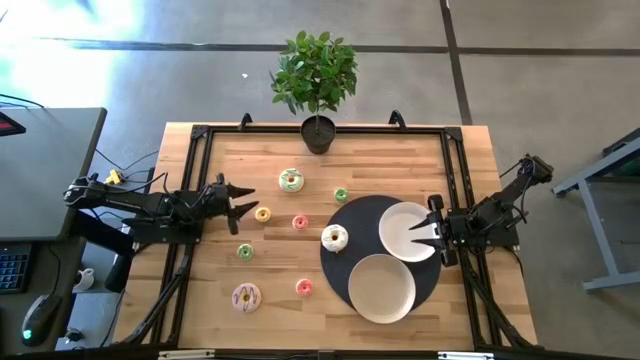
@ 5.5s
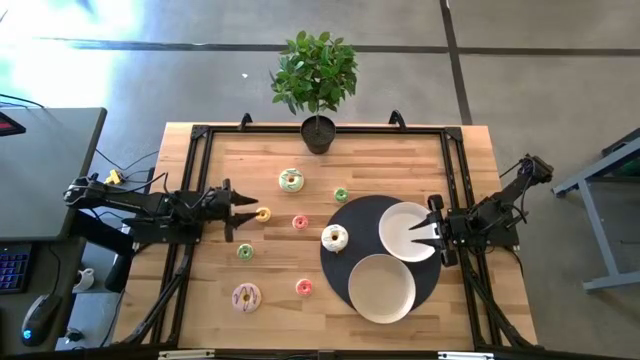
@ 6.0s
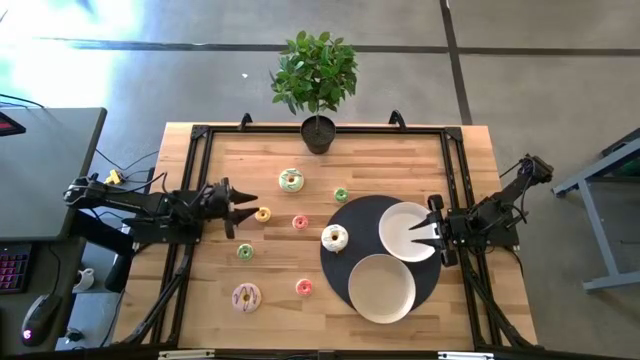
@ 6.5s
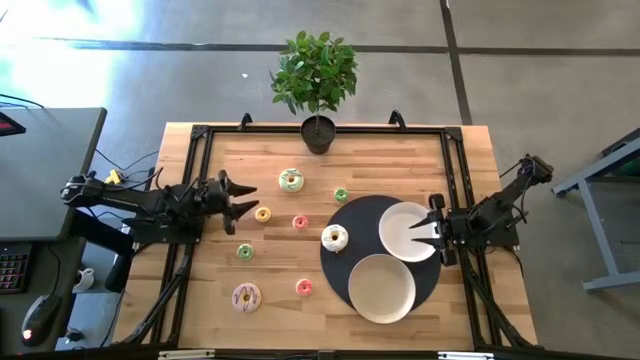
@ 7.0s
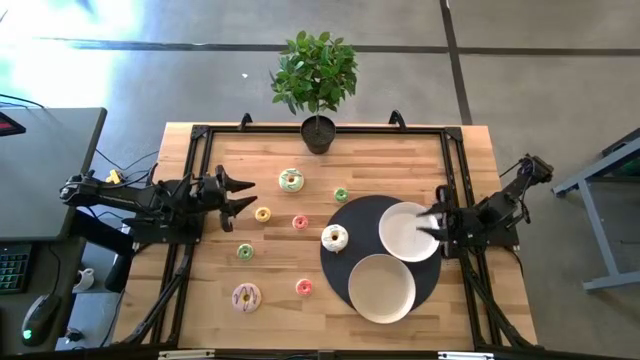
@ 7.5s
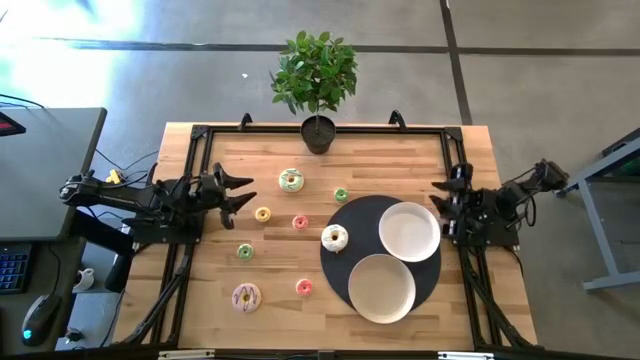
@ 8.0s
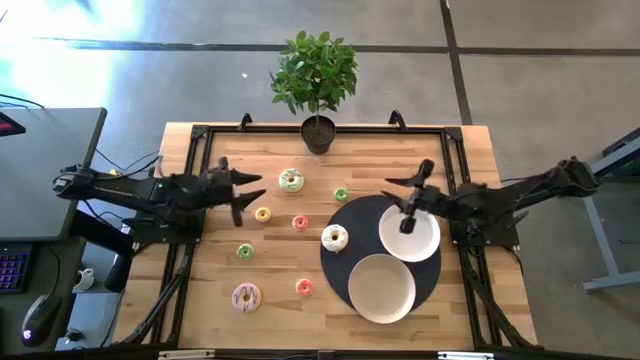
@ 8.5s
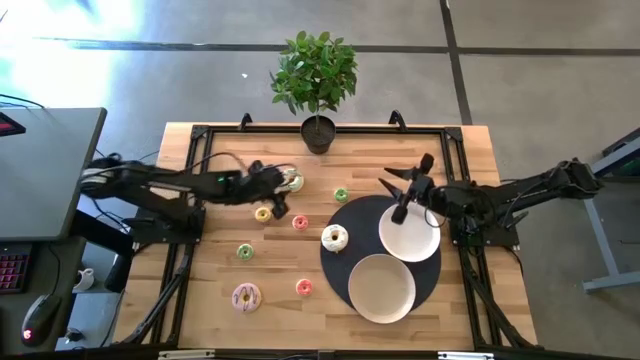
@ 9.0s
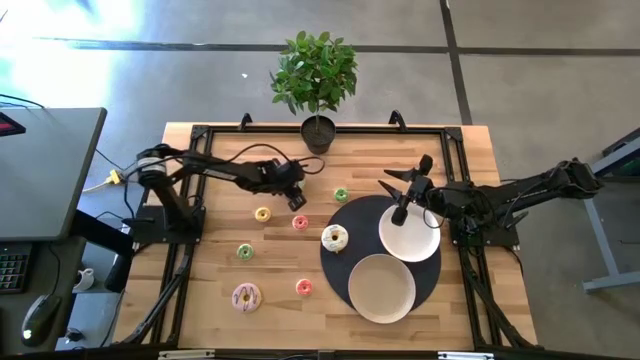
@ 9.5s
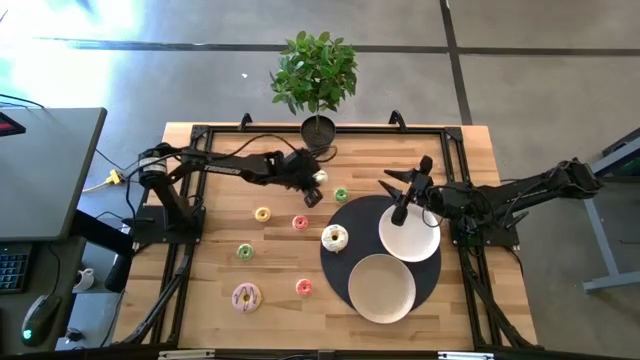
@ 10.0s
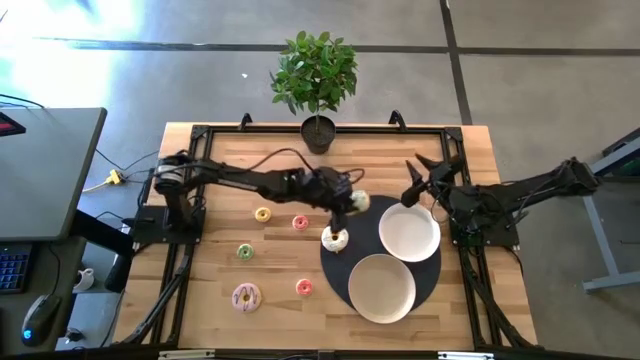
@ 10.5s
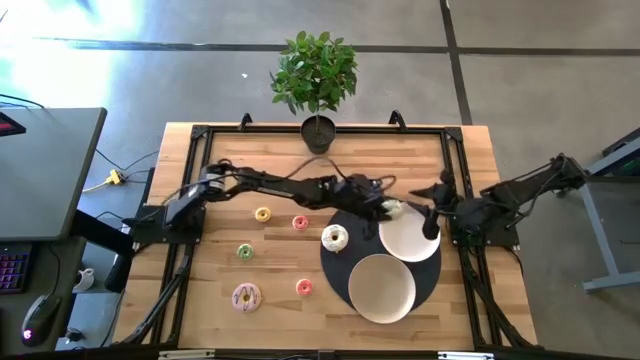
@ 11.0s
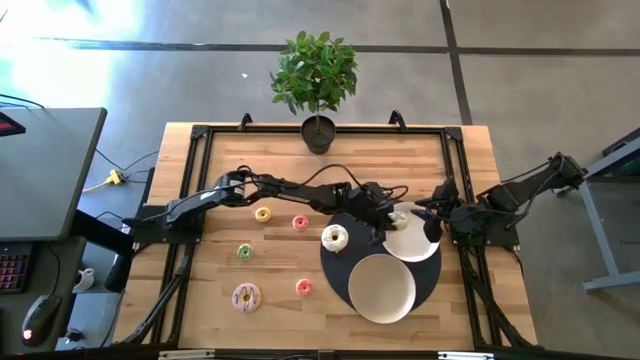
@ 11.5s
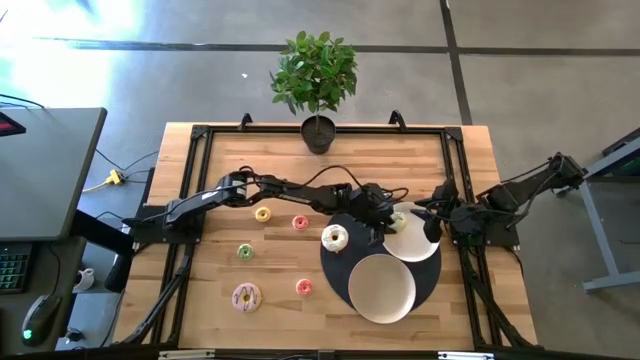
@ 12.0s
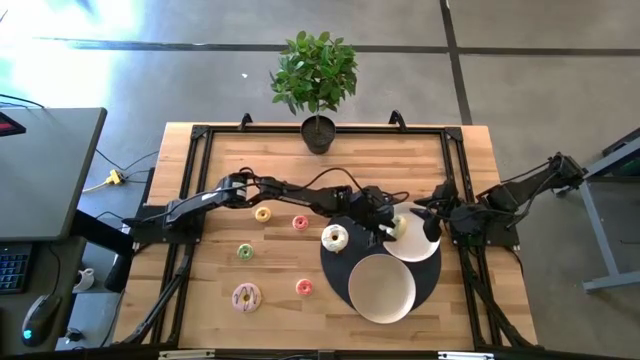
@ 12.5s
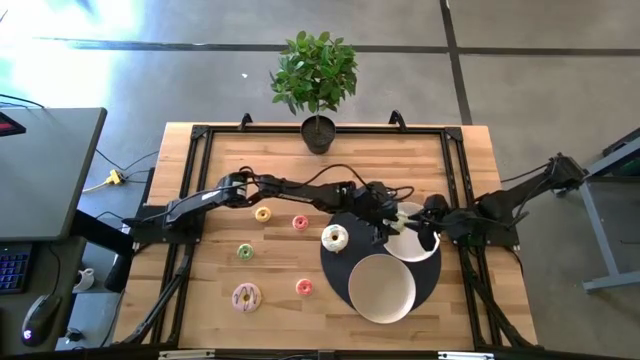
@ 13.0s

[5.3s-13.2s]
Task: Pick & Place donuts
Put the big blue donut on the top white plate

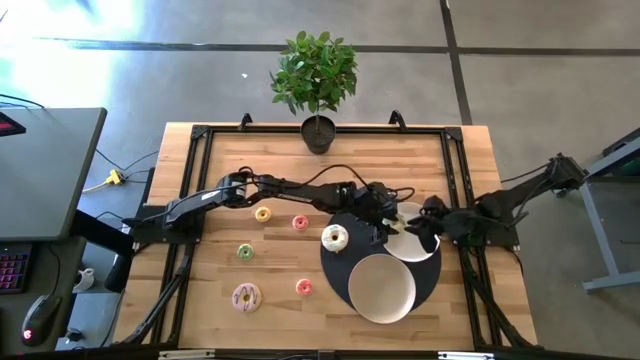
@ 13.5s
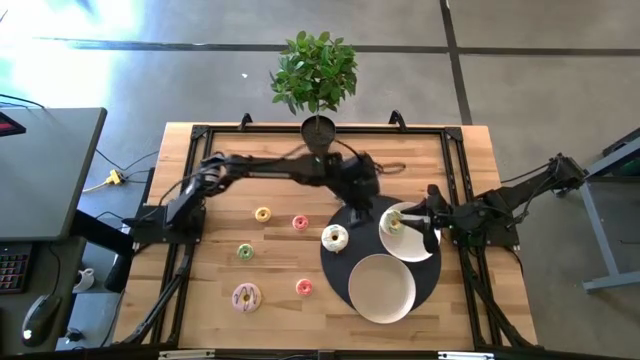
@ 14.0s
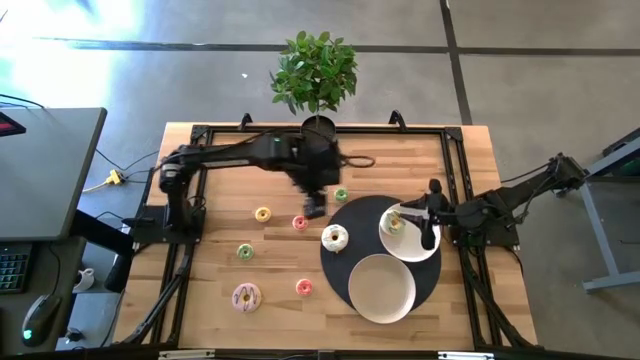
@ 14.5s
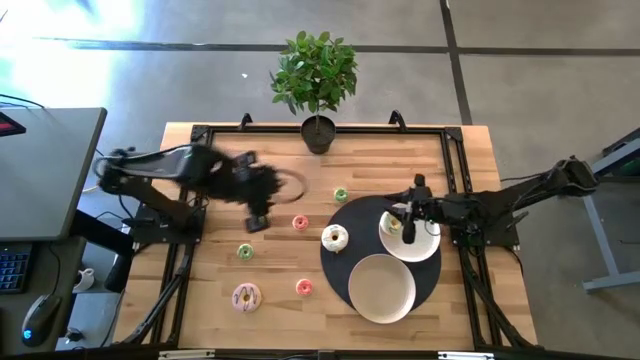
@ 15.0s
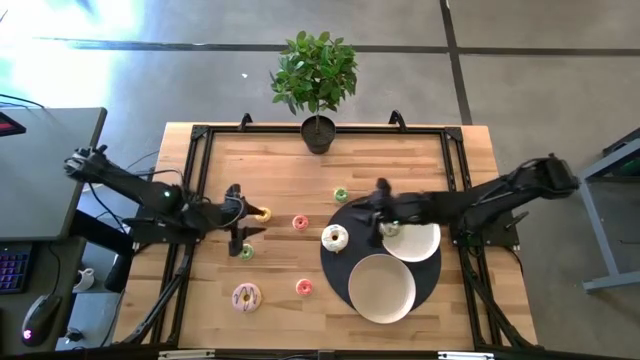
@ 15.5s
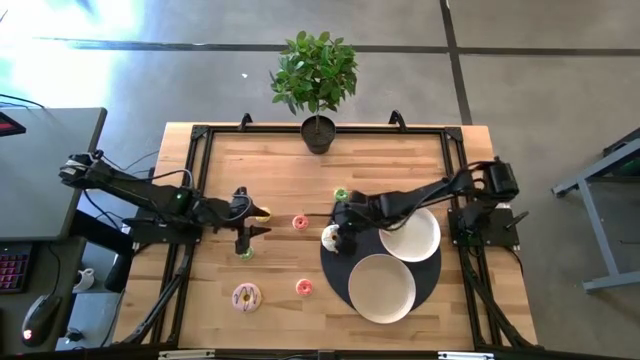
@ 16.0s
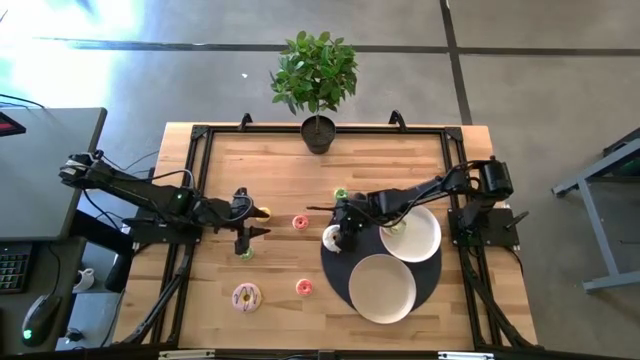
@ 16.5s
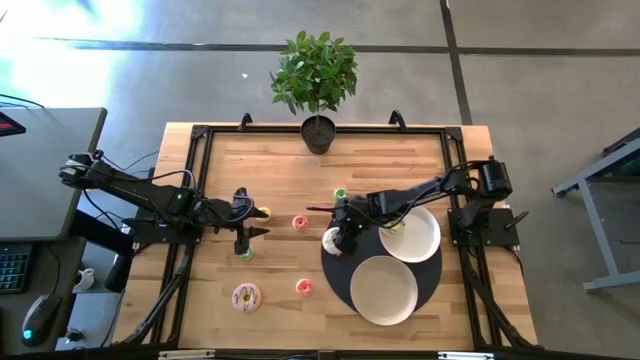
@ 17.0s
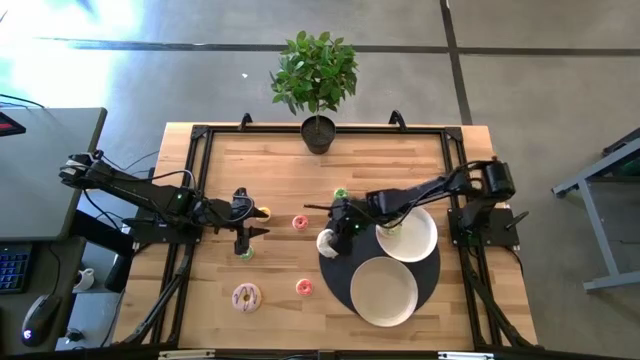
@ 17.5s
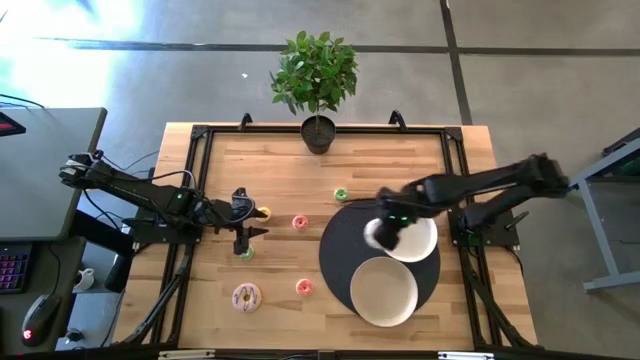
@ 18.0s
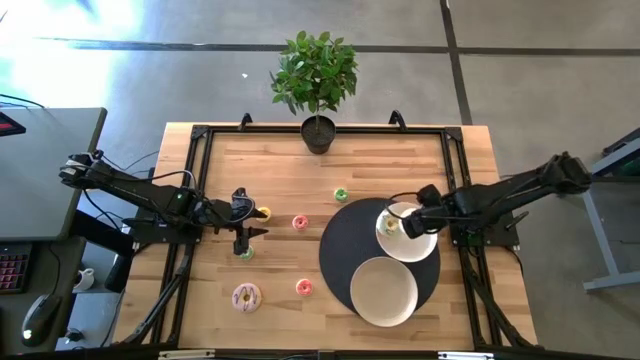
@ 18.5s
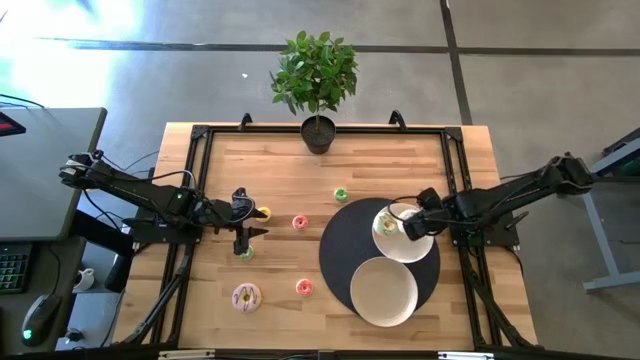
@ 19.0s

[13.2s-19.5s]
Put the big white donut on the top white plate

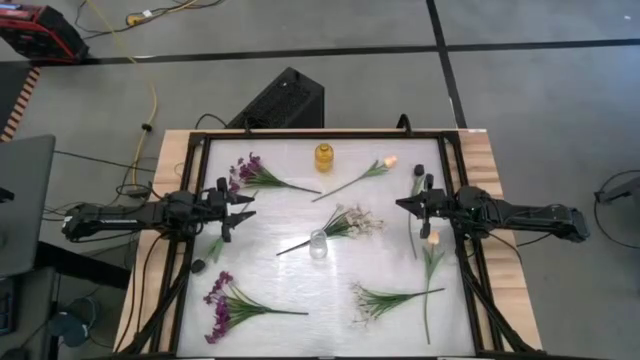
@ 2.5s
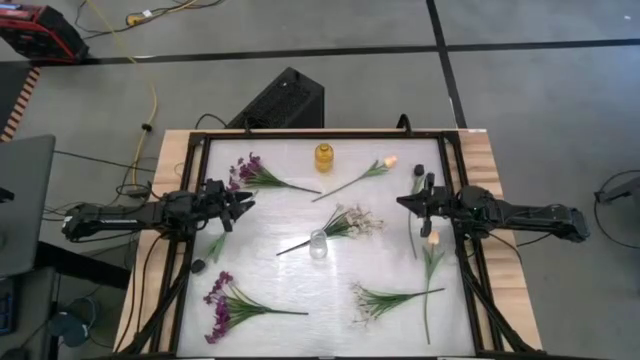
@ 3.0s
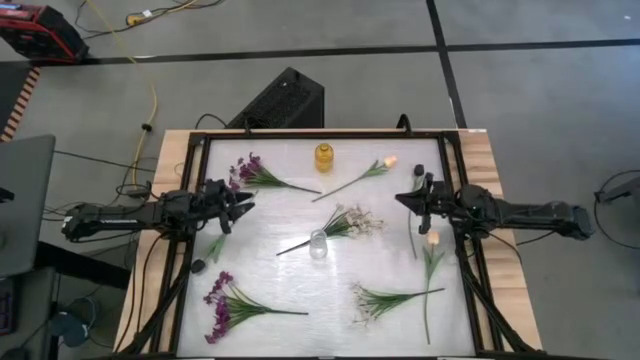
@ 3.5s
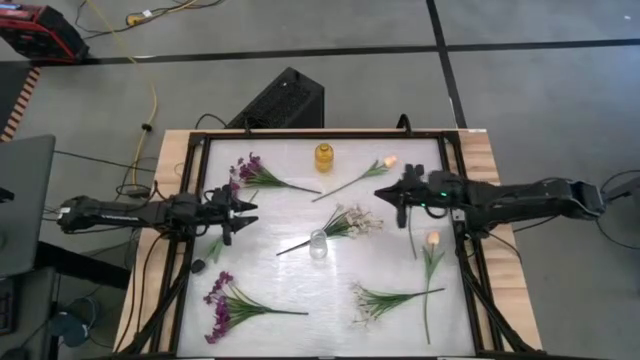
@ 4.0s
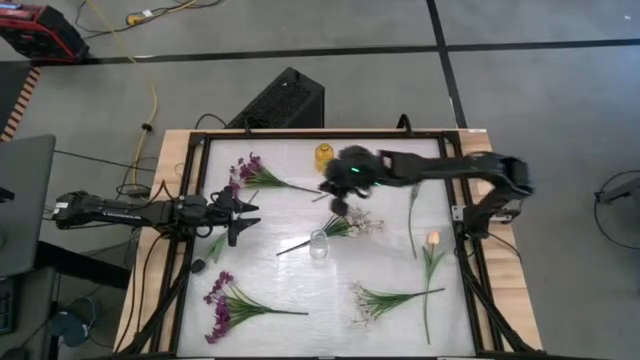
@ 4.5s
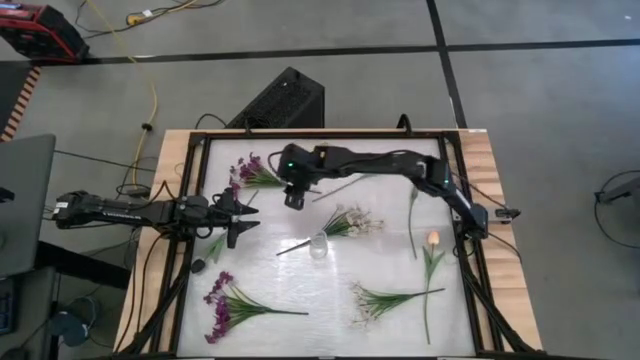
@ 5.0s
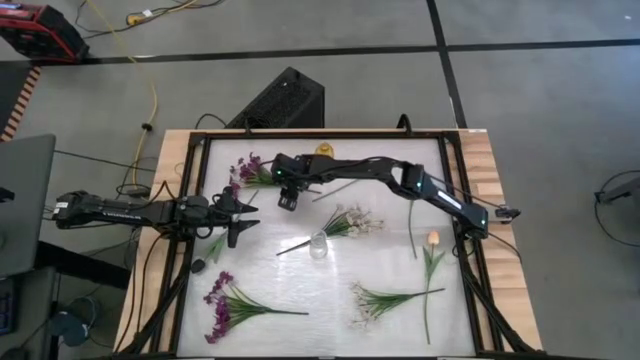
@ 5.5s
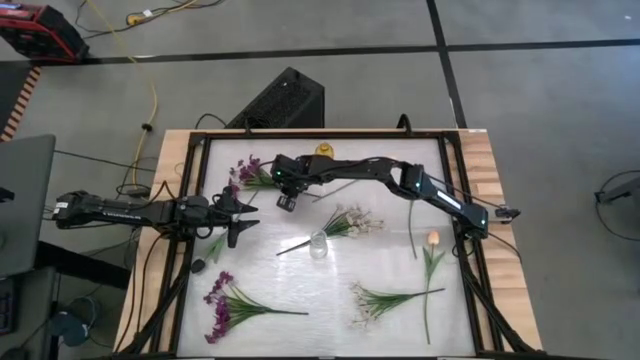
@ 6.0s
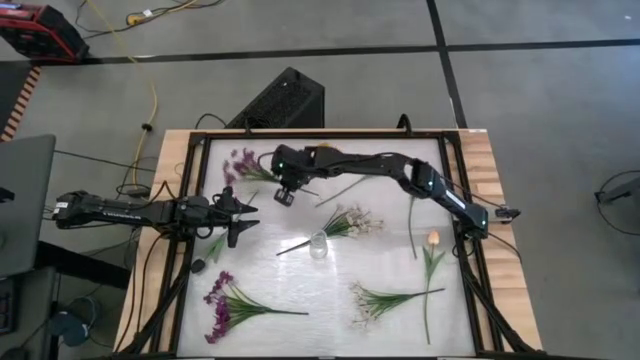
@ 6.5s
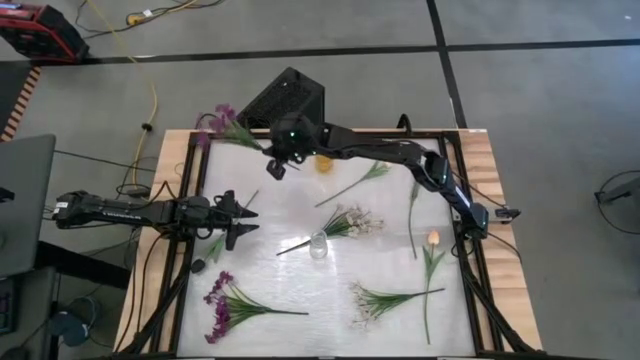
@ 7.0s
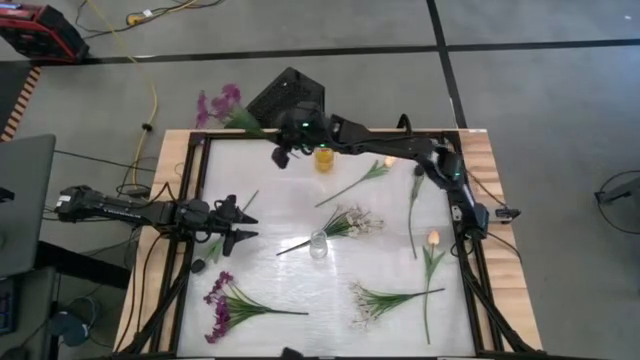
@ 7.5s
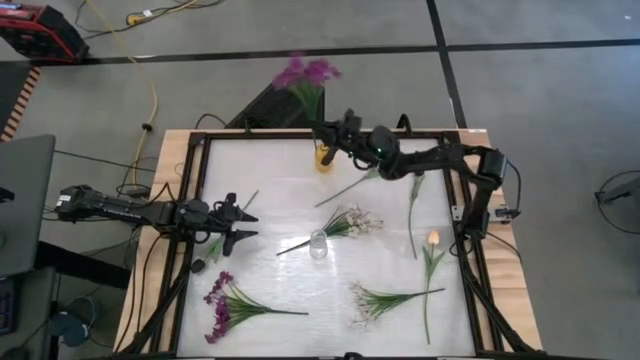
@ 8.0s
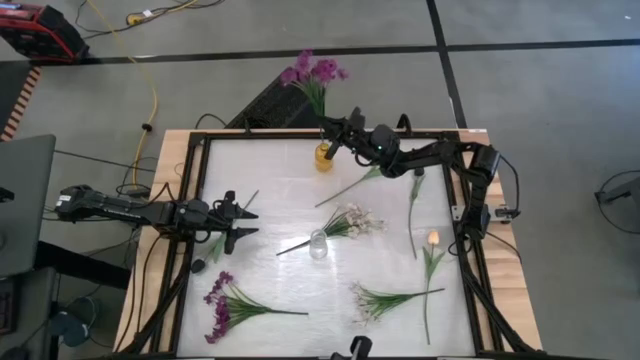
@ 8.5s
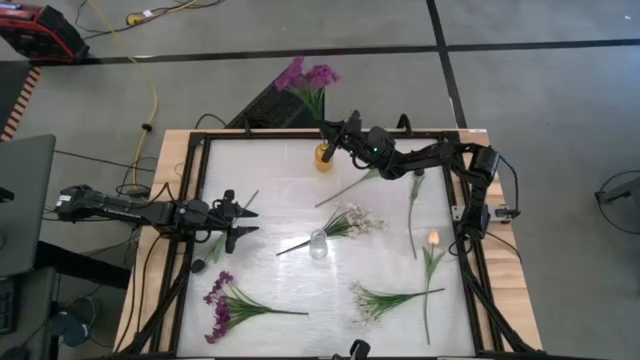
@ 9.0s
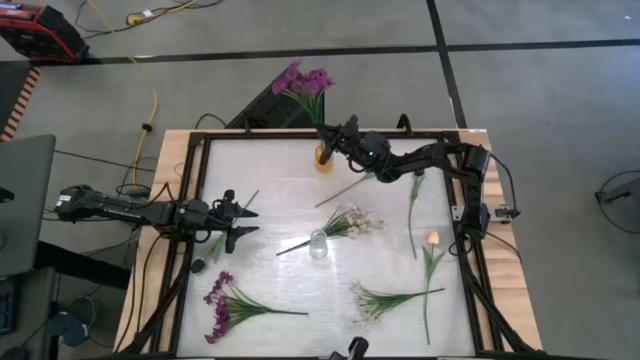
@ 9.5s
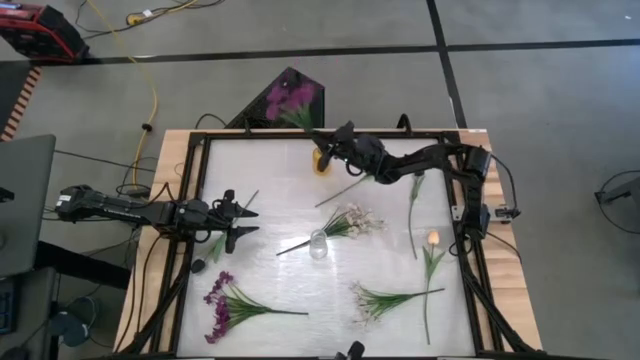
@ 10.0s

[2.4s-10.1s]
Task: Sort flowers into vase by color
Put the top purple flowers into the yellow vase
